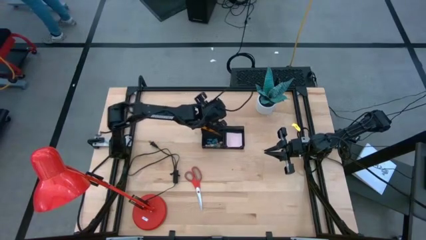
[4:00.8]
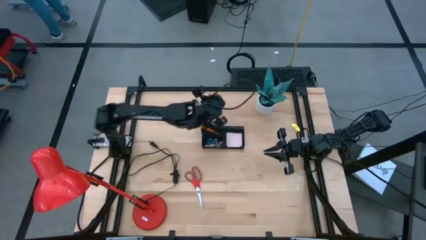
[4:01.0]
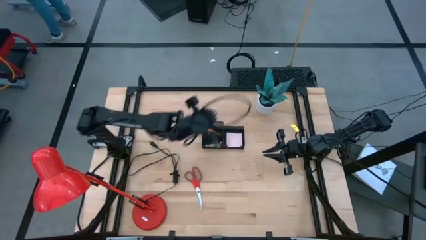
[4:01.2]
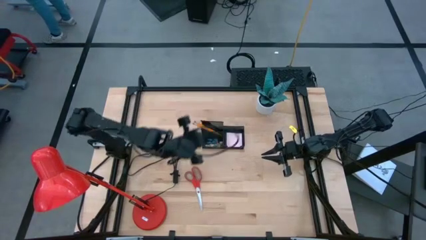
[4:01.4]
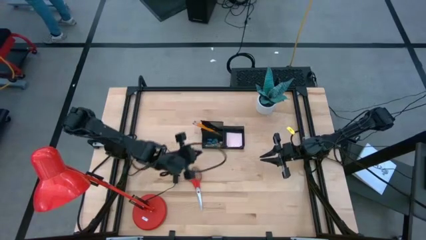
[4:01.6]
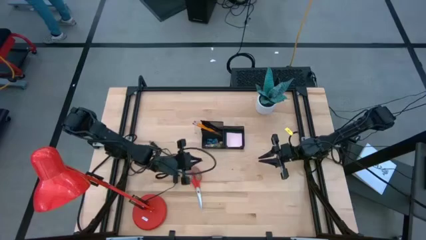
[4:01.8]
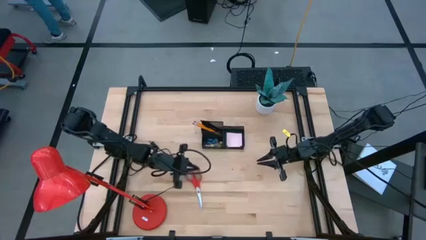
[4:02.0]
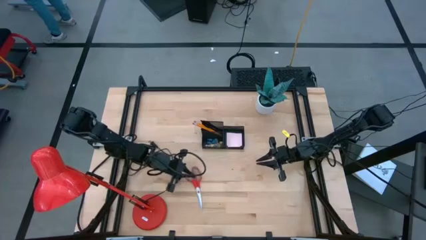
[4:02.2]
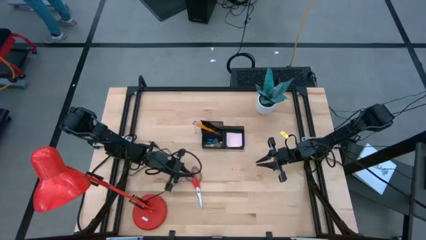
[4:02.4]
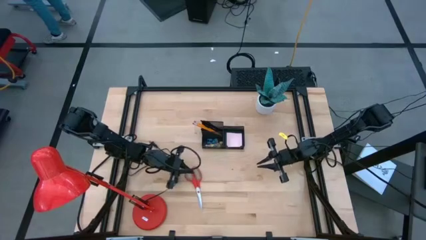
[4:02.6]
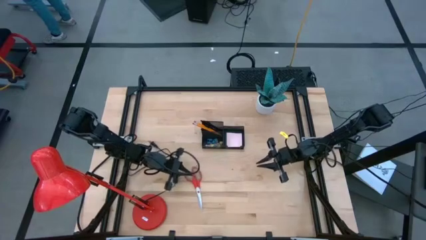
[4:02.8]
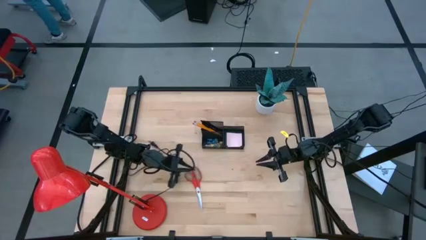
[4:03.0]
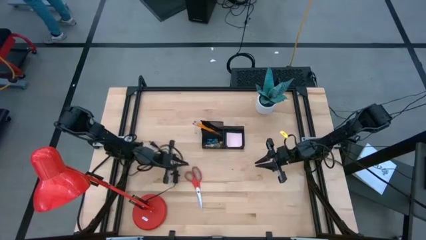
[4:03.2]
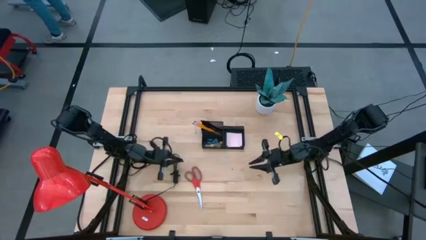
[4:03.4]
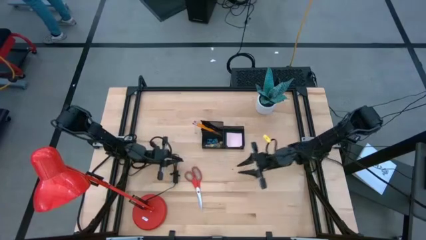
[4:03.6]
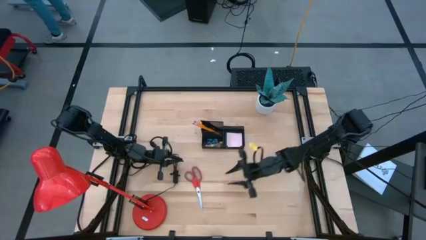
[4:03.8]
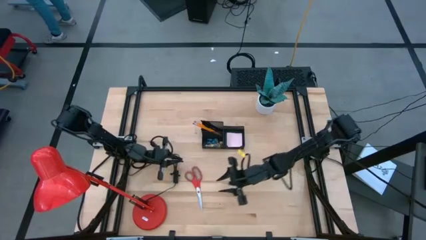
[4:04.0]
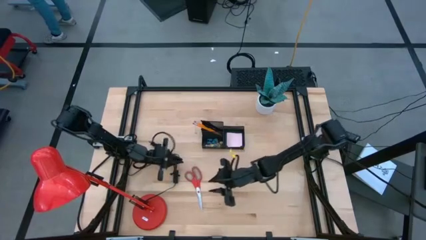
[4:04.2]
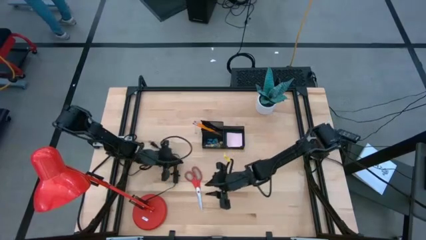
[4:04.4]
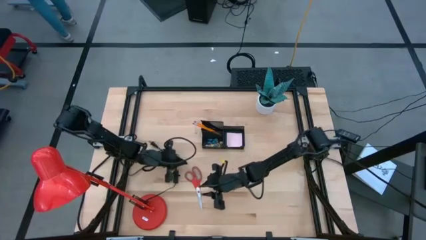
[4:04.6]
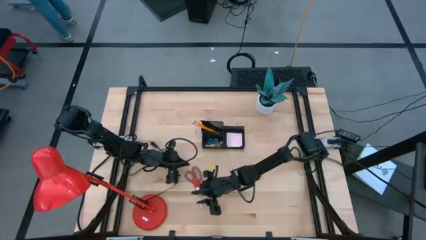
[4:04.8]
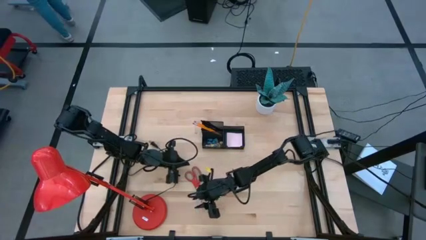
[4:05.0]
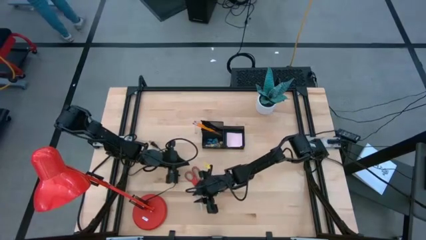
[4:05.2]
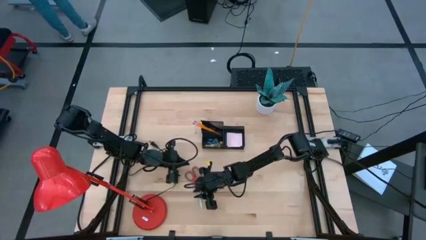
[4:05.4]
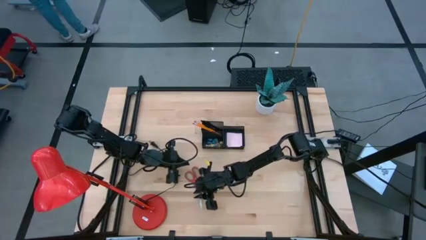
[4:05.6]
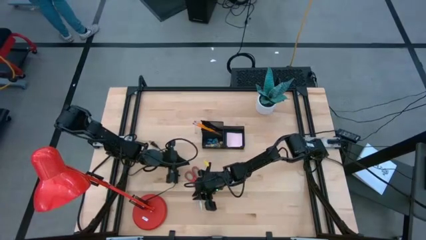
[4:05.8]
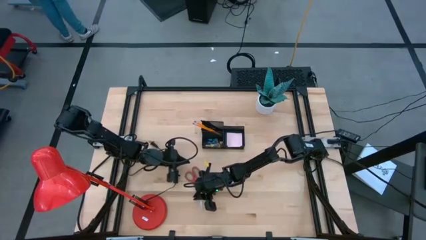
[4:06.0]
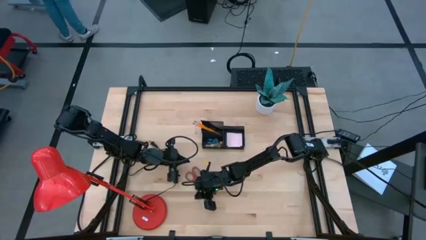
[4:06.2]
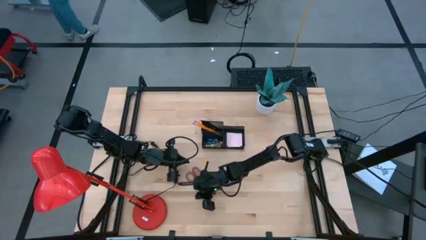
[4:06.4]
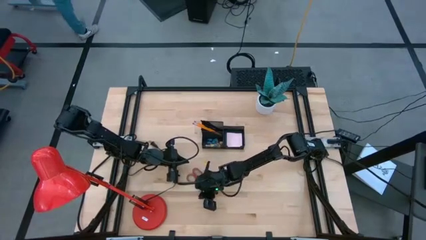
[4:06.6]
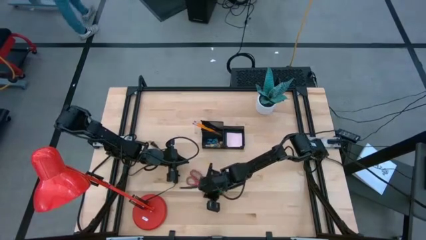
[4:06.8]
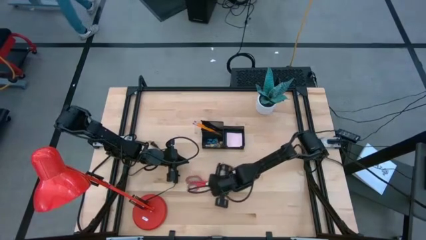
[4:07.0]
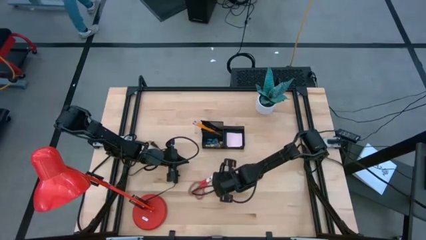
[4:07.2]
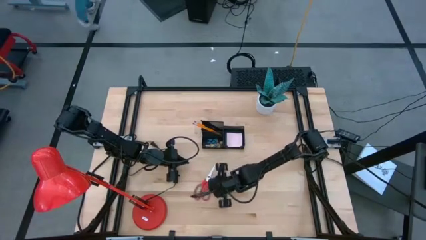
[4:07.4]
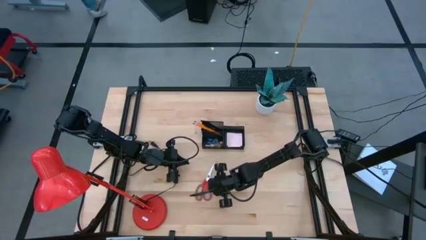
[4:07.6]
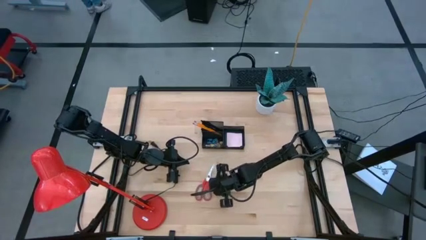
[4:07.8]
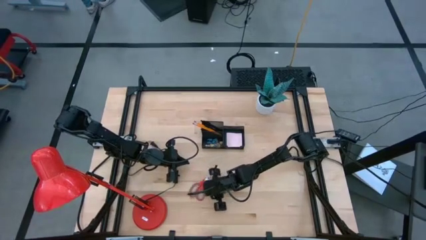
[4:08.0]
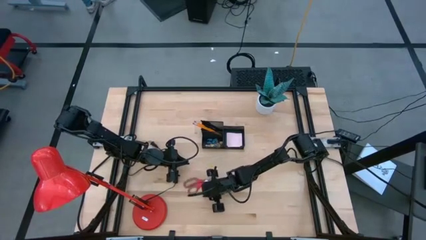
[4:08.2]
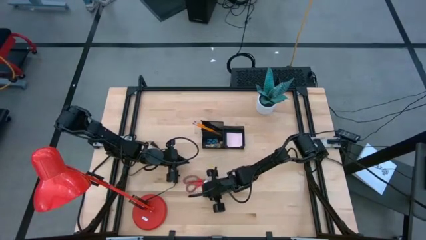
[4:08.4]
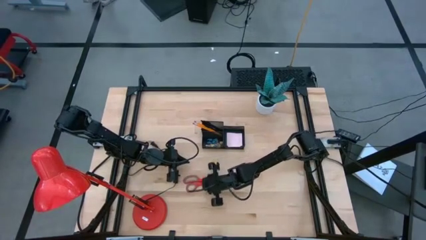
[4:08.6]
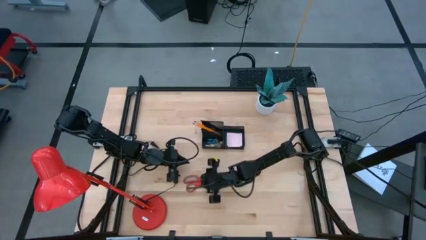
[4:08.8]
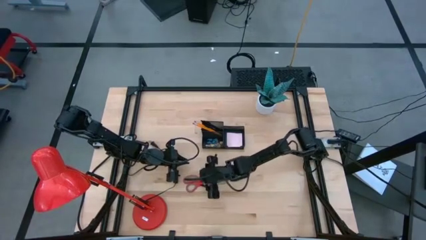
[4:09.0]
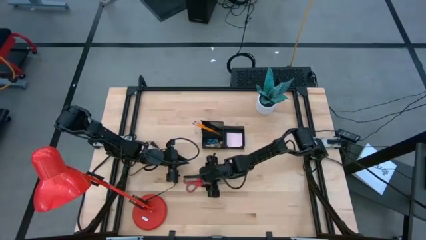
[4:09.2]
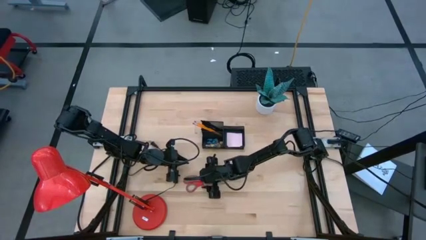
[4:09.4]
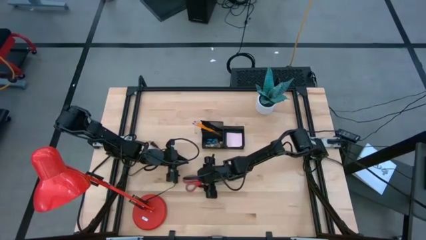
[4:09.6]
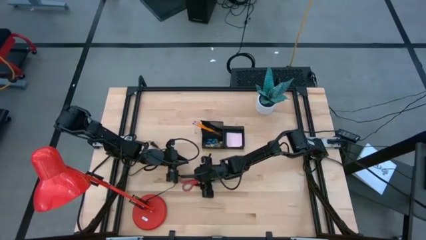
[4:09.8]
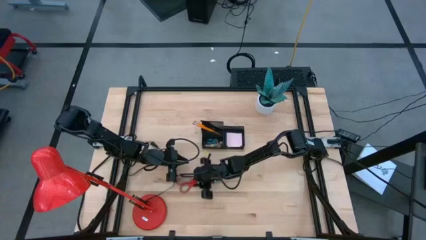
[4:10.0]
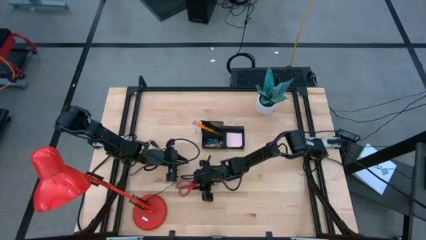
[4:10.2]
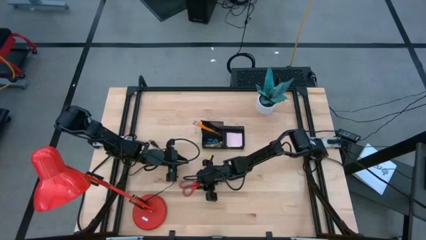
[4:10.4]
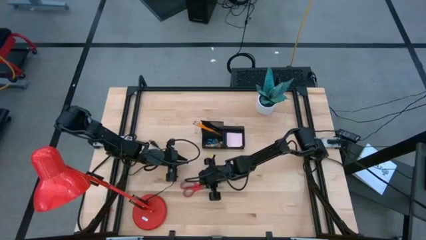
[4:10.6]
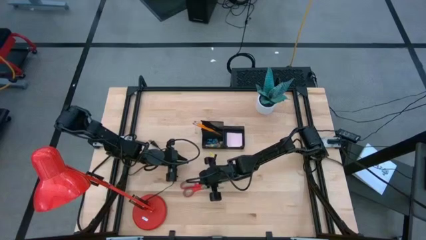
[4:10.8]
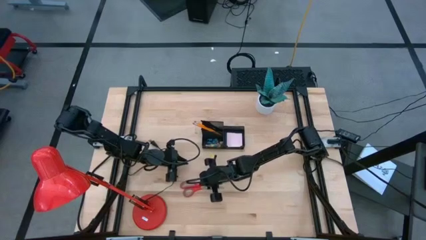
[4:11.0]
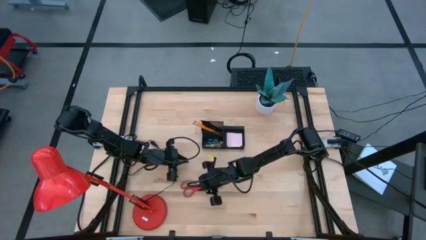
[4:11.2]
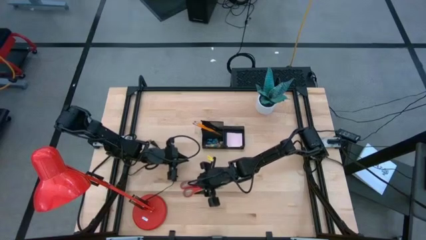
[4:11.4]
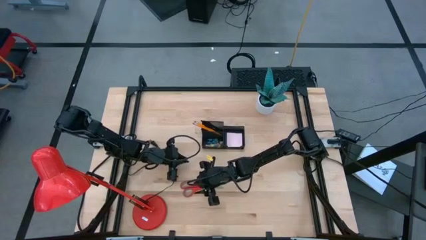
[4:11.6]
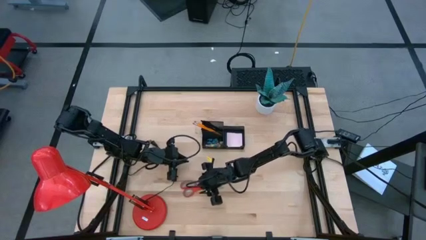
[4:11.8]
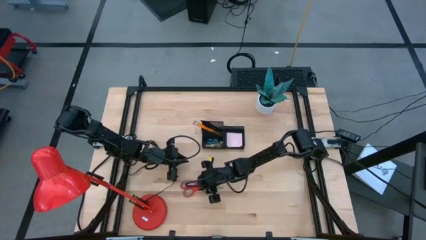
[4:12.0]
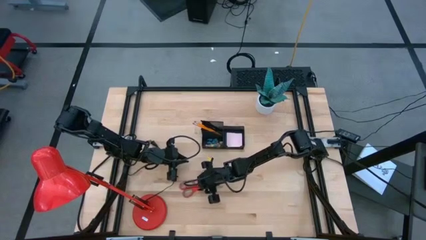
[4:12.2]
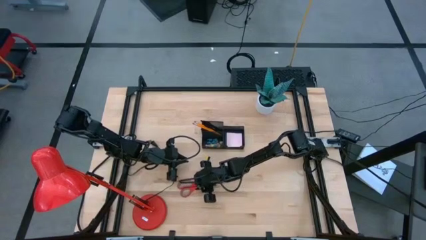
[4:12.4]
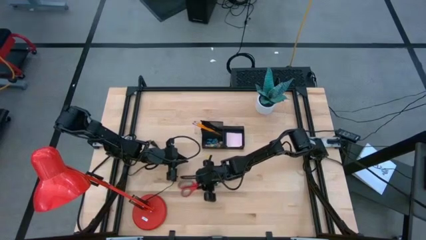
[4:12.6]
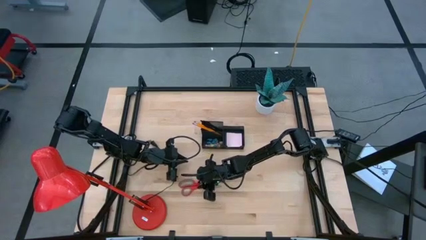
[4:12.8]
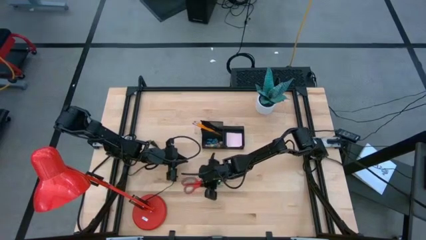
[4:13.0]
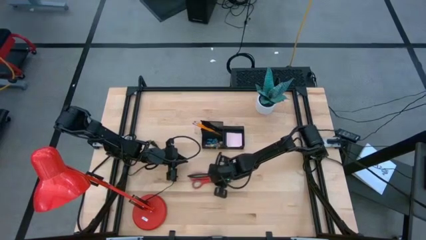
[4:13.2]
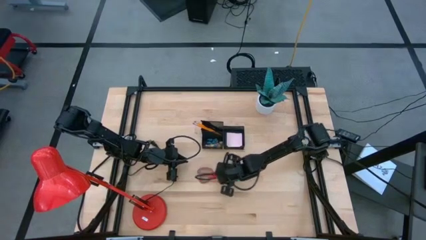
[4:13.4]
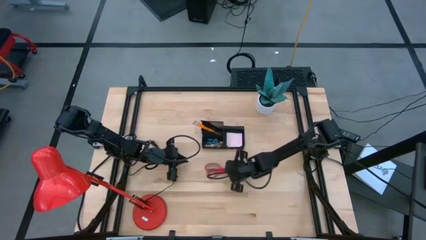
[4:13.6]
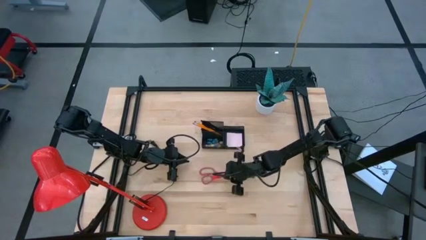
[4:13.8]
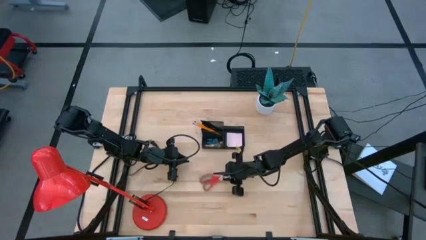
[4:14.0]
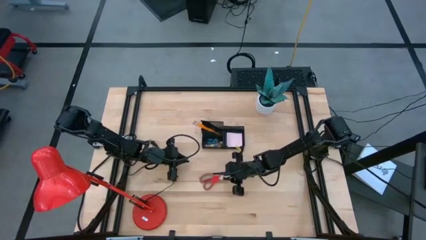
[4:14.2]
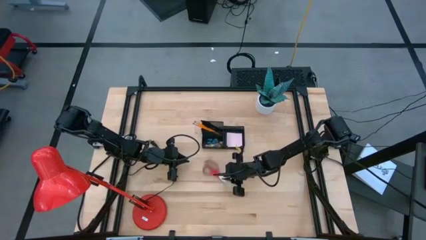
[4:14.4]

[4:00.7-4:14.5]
Task: Pick and place office supplies into organizer
Put the red scissors into the black desk organizer

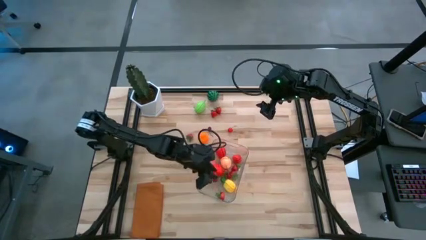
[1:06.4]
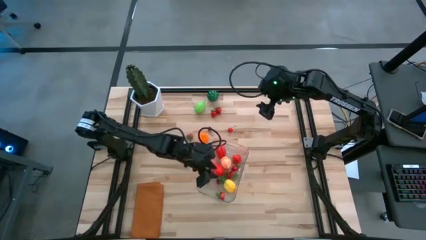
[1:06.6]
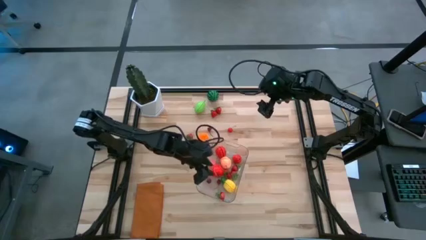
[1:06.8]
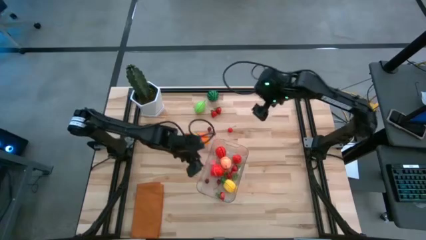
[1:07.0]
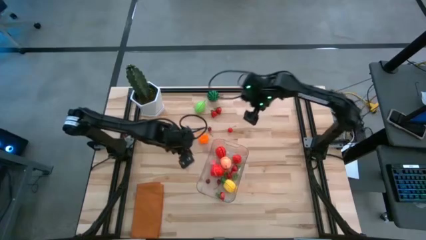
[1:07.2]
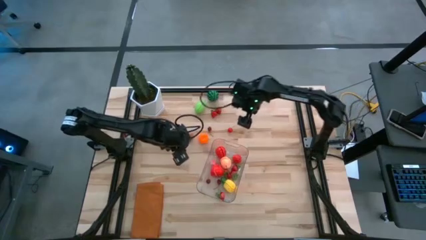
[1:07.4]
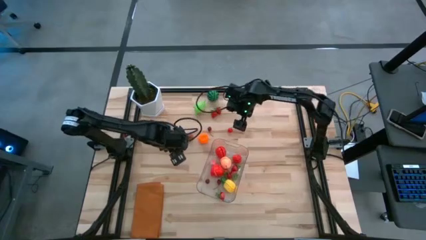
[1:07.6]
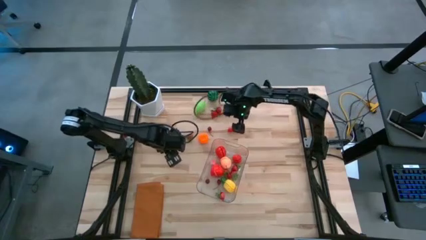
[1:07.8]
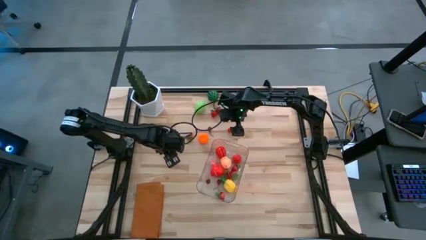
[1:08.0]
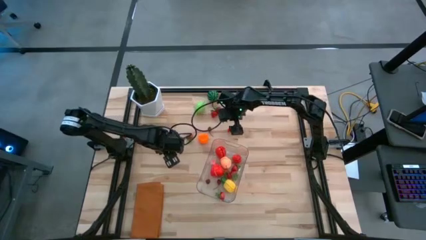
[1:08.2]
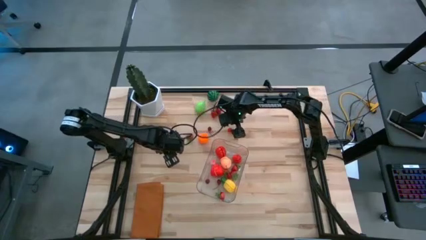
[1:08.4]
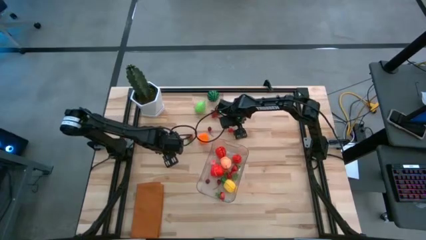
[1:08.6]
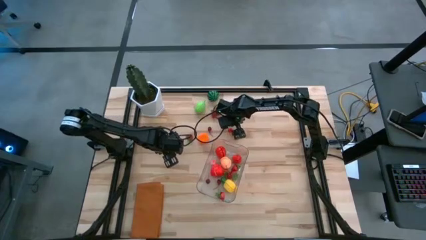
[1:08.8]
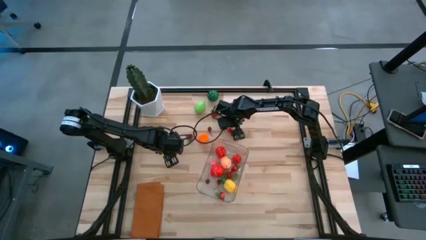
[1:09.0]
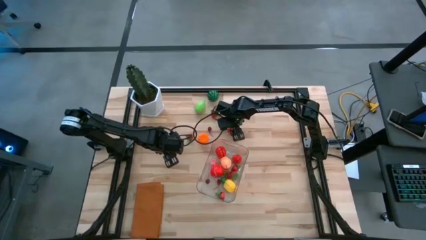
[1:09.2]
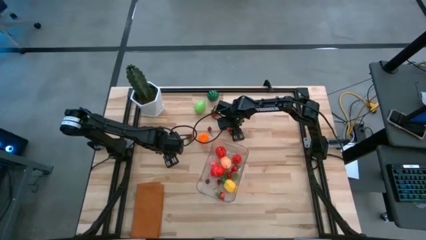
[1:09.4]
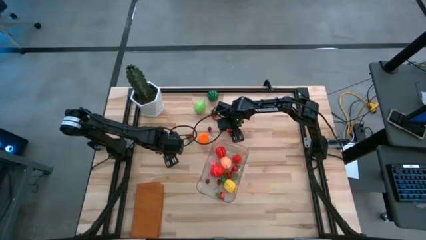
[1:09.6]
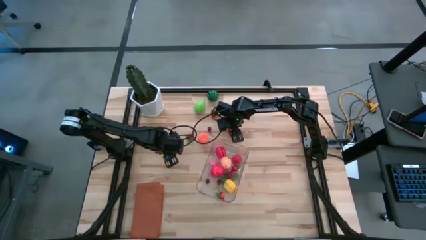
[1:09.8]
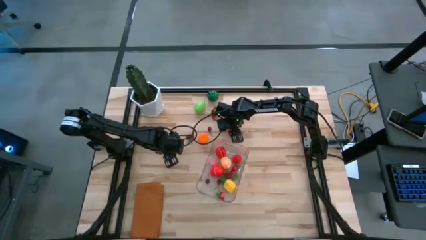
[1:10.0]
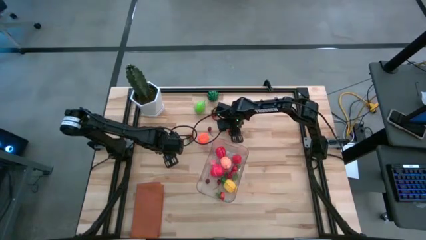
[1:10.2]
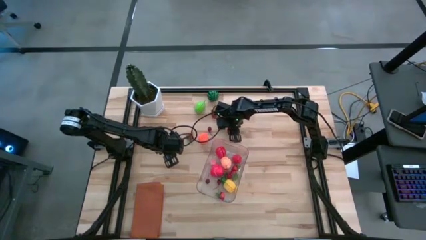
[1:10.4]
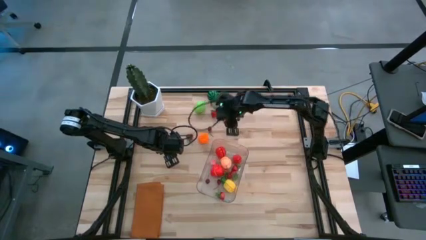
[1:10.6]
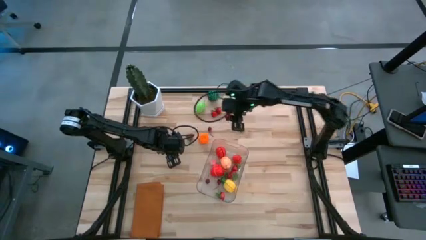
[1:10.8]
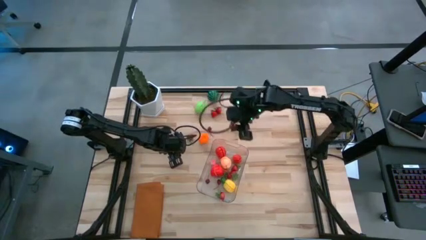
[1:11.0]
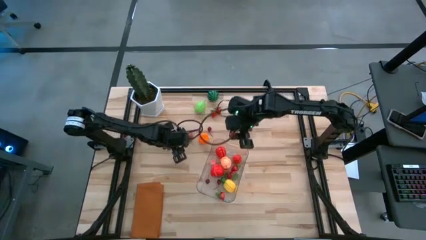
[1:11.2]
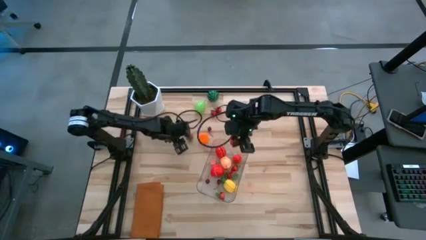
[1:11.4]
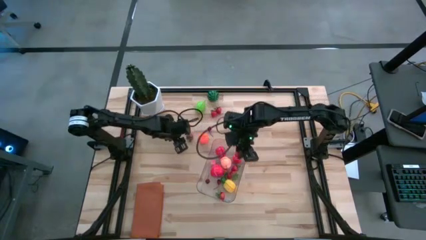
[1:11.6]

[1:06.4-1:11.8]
Task: Pick and placing Produce into tupperware
Put the red cherry into the transparent bin
